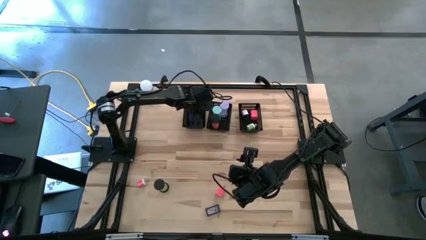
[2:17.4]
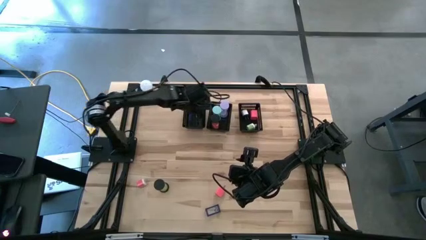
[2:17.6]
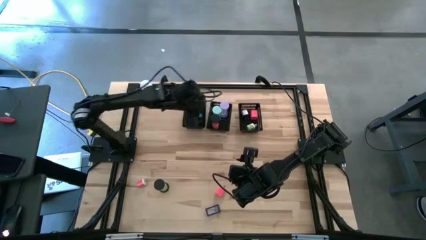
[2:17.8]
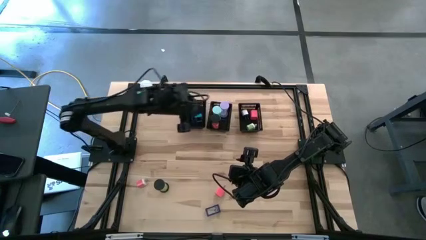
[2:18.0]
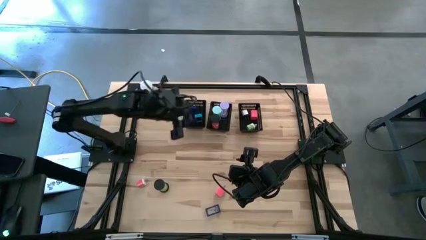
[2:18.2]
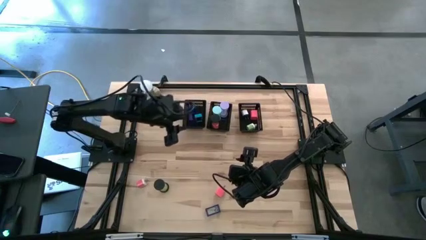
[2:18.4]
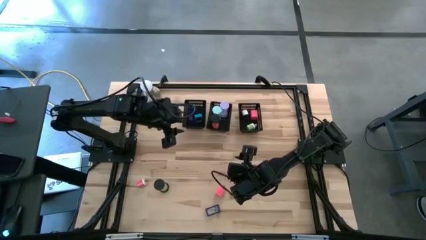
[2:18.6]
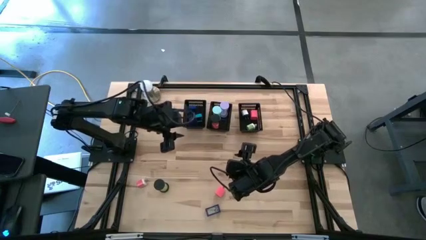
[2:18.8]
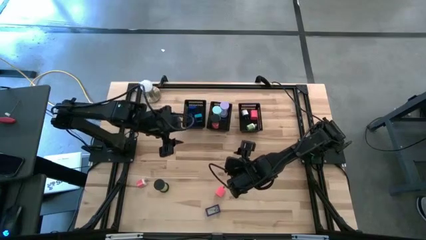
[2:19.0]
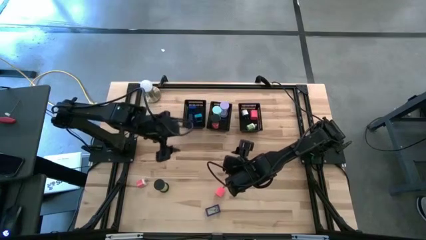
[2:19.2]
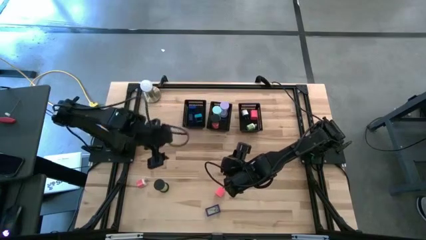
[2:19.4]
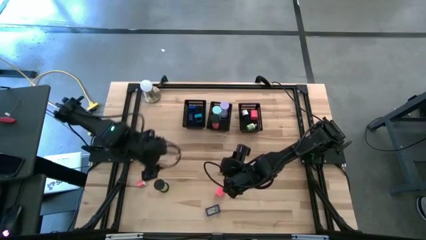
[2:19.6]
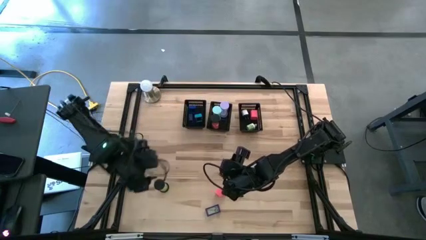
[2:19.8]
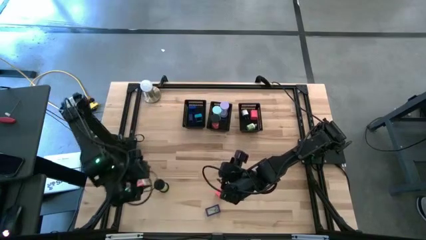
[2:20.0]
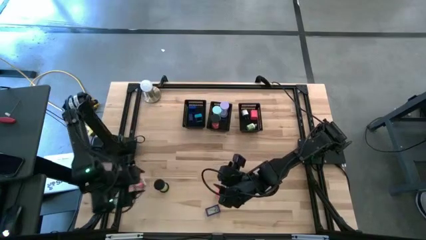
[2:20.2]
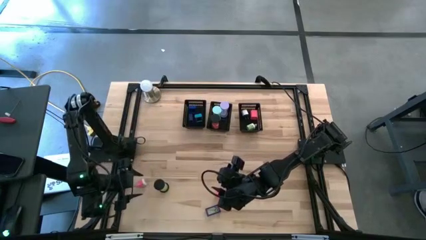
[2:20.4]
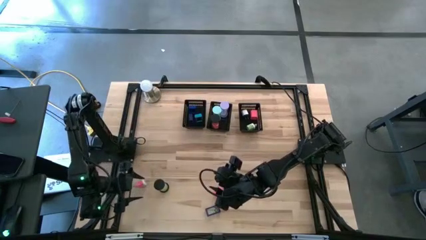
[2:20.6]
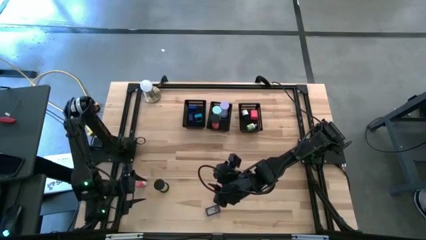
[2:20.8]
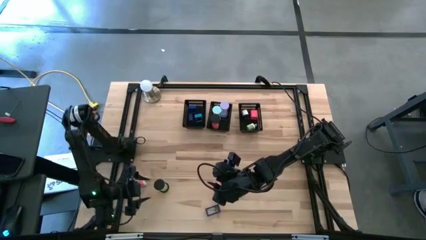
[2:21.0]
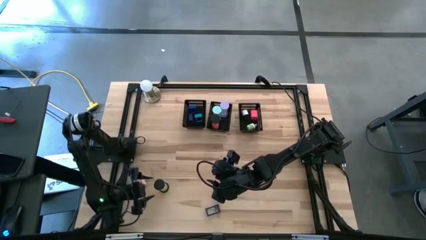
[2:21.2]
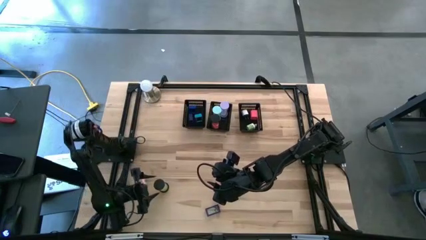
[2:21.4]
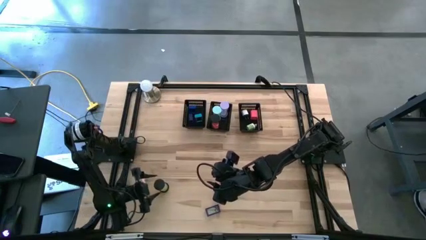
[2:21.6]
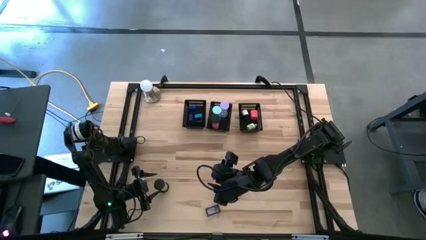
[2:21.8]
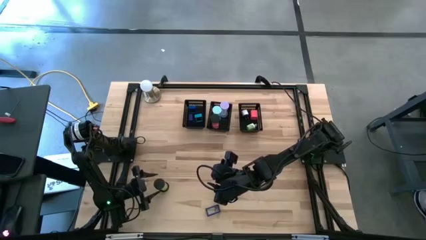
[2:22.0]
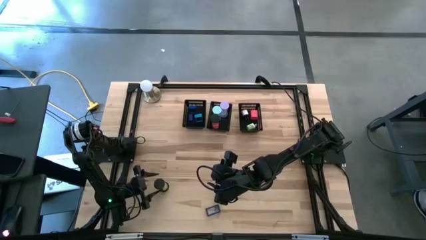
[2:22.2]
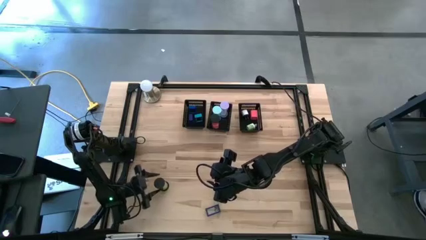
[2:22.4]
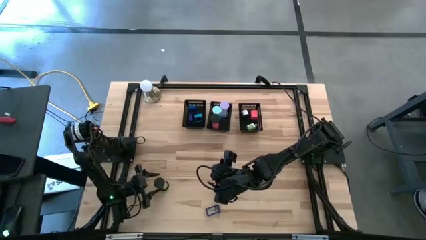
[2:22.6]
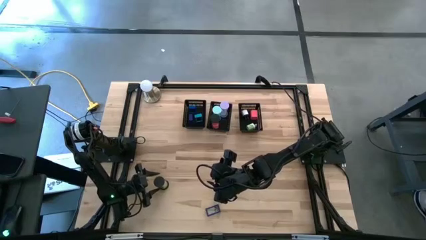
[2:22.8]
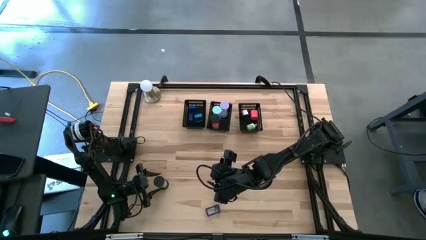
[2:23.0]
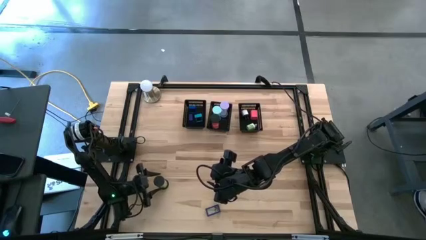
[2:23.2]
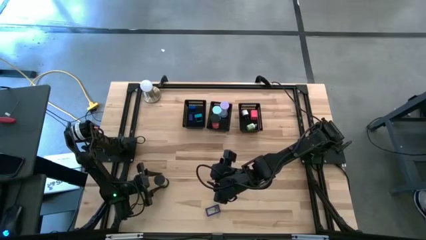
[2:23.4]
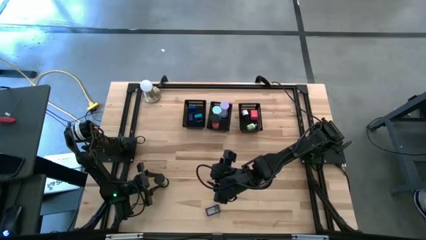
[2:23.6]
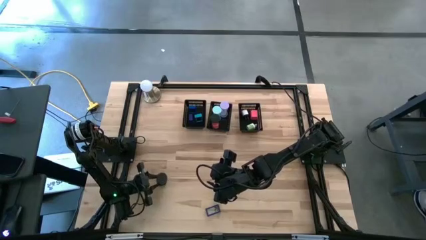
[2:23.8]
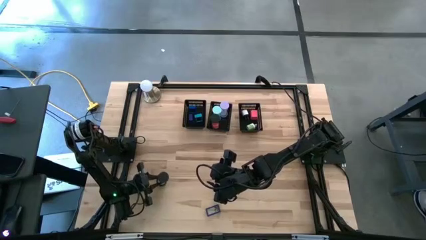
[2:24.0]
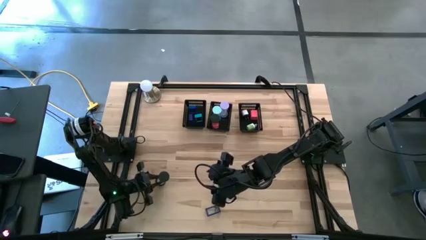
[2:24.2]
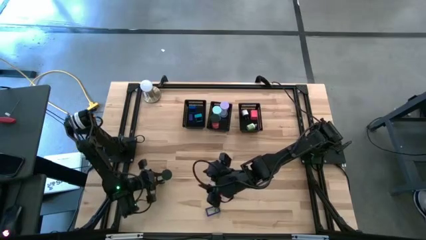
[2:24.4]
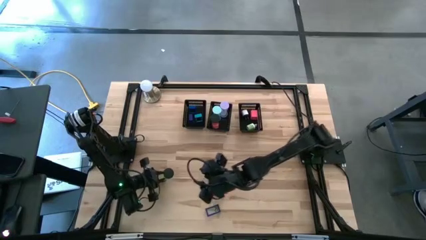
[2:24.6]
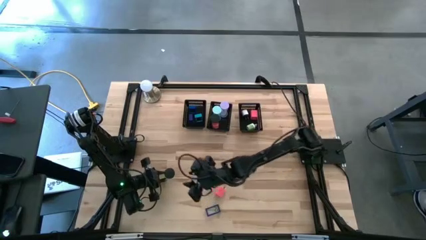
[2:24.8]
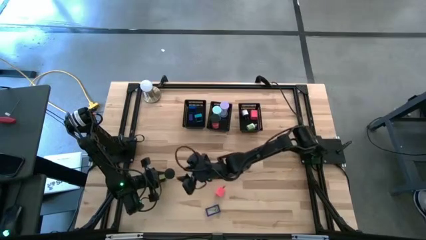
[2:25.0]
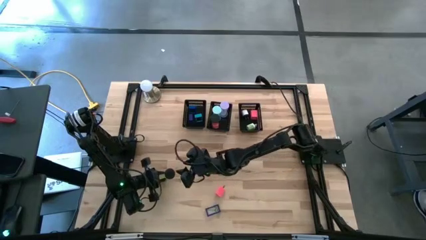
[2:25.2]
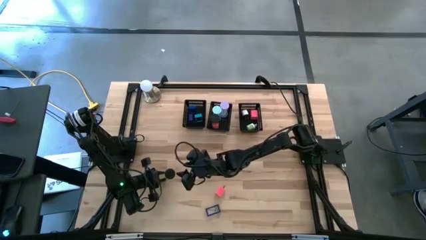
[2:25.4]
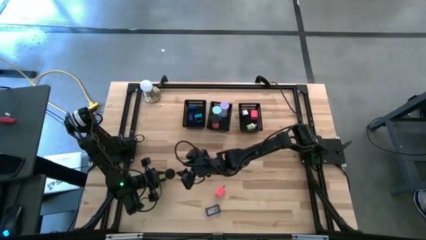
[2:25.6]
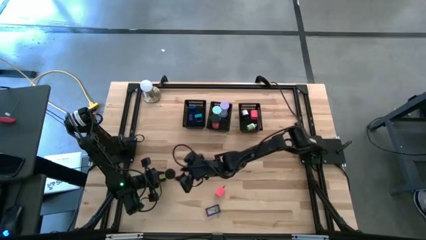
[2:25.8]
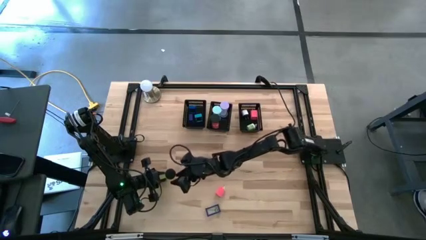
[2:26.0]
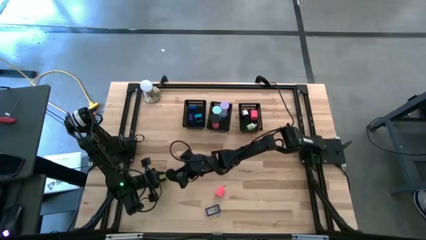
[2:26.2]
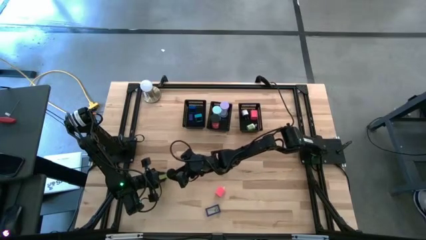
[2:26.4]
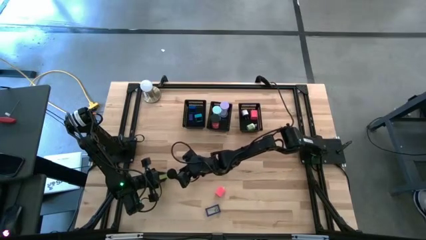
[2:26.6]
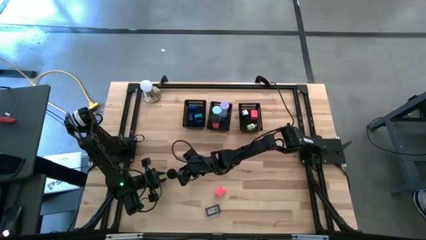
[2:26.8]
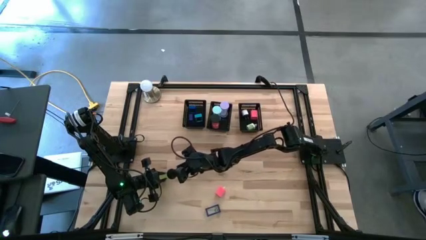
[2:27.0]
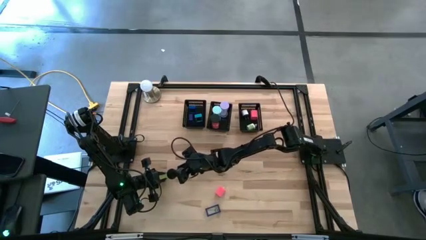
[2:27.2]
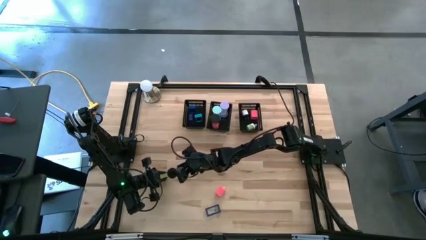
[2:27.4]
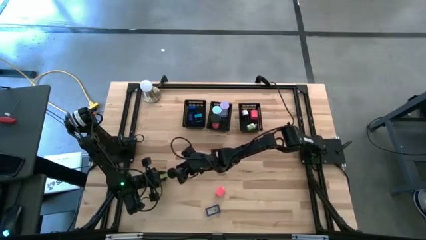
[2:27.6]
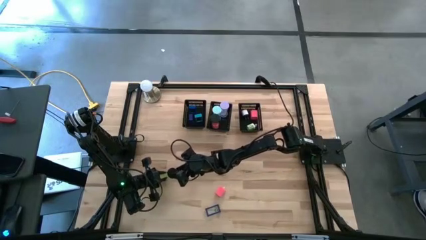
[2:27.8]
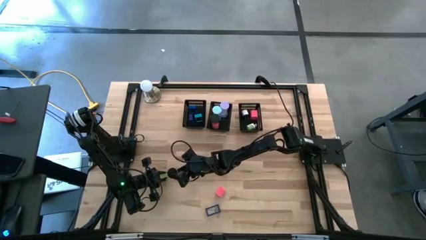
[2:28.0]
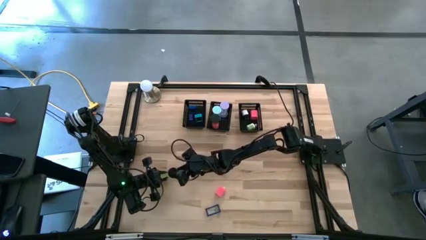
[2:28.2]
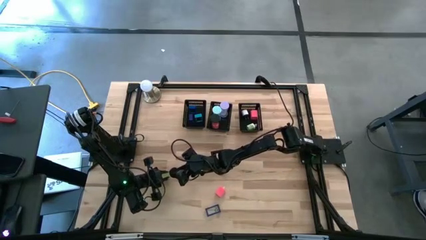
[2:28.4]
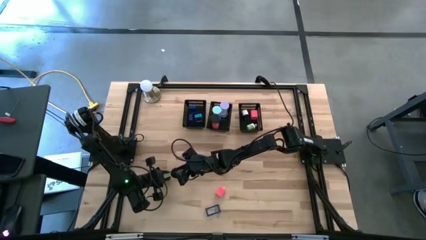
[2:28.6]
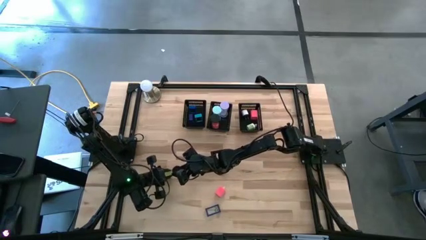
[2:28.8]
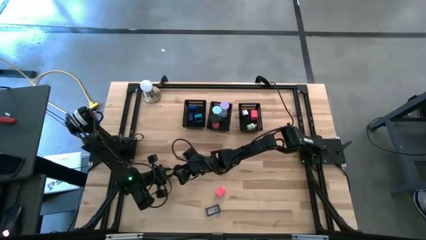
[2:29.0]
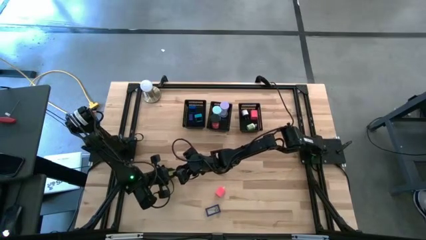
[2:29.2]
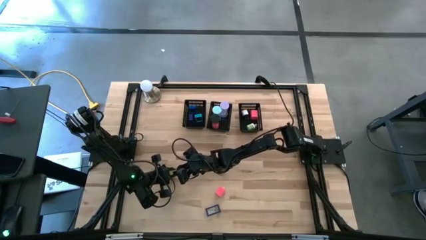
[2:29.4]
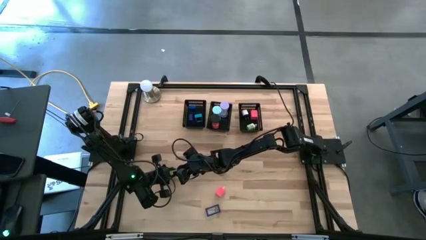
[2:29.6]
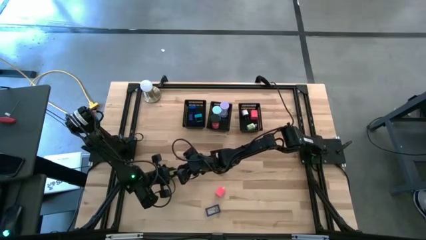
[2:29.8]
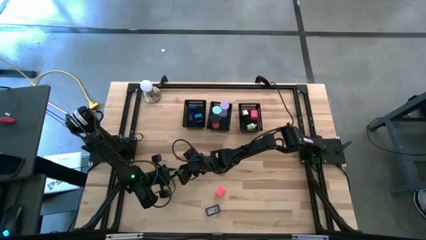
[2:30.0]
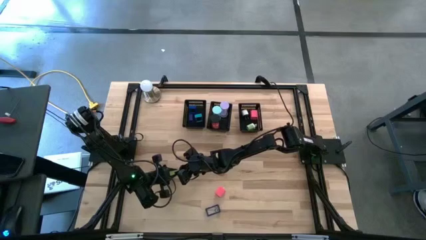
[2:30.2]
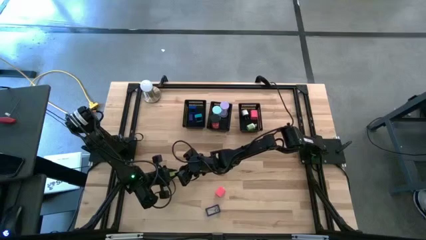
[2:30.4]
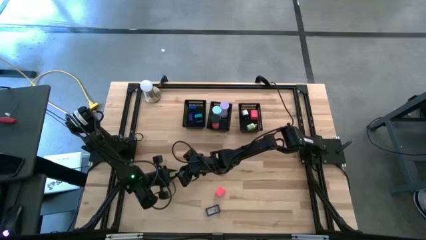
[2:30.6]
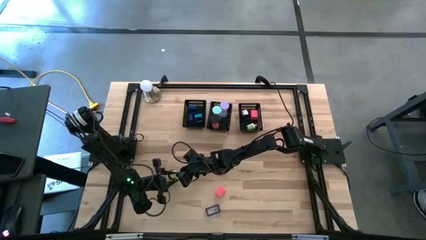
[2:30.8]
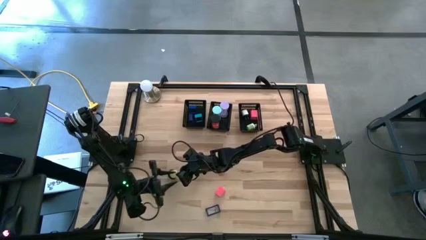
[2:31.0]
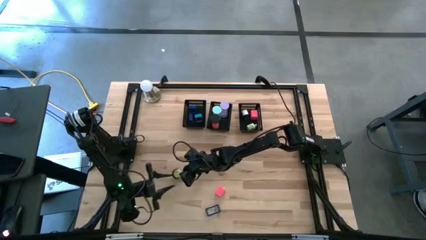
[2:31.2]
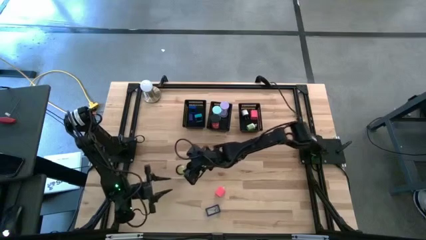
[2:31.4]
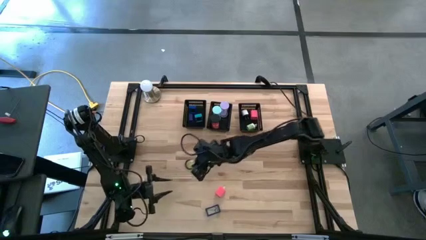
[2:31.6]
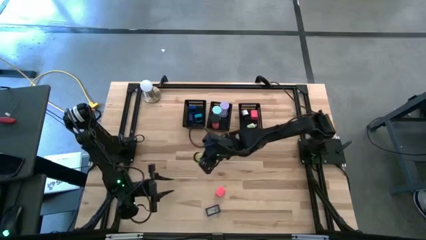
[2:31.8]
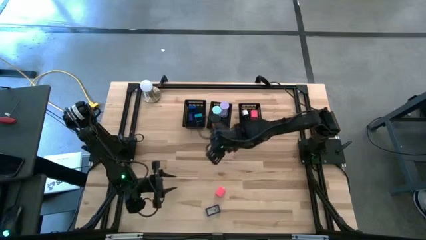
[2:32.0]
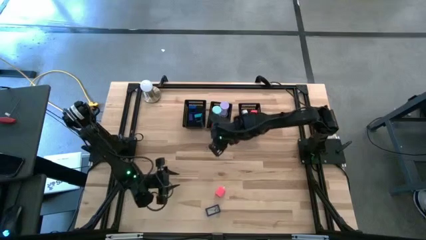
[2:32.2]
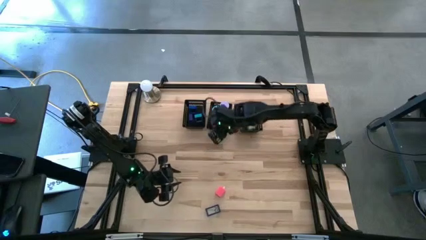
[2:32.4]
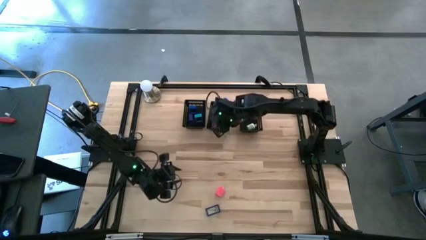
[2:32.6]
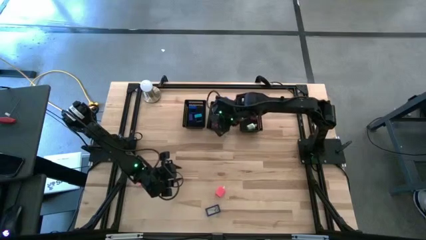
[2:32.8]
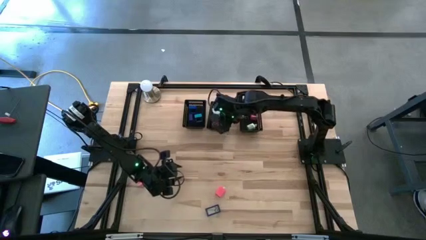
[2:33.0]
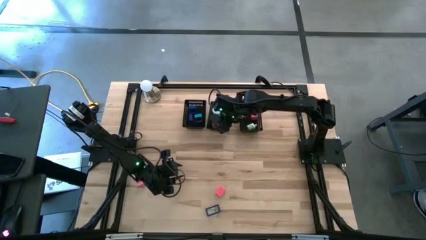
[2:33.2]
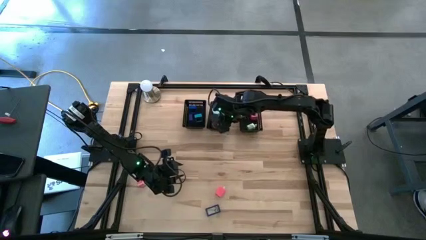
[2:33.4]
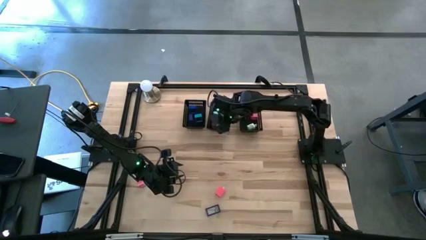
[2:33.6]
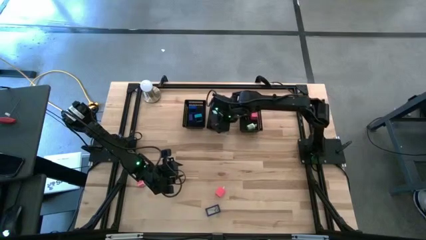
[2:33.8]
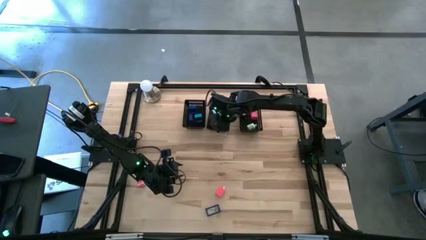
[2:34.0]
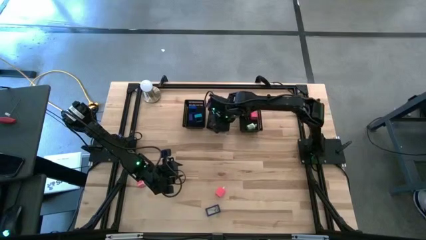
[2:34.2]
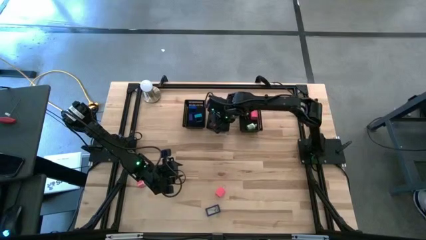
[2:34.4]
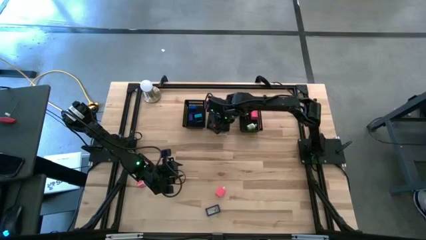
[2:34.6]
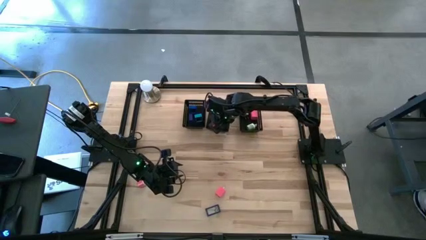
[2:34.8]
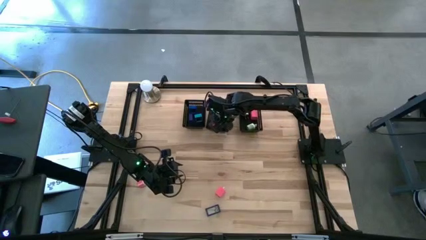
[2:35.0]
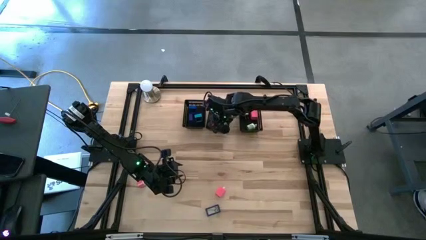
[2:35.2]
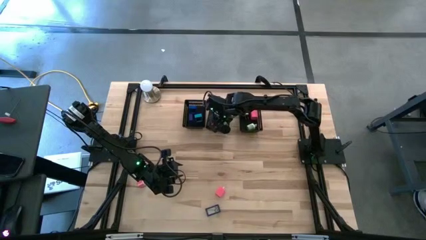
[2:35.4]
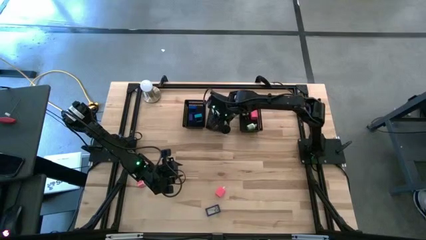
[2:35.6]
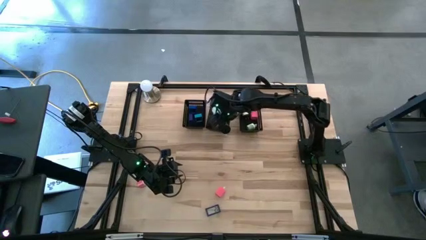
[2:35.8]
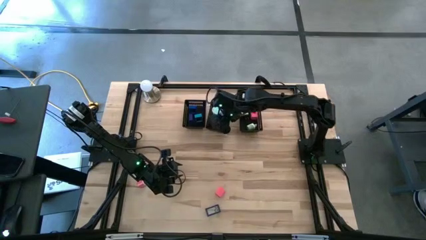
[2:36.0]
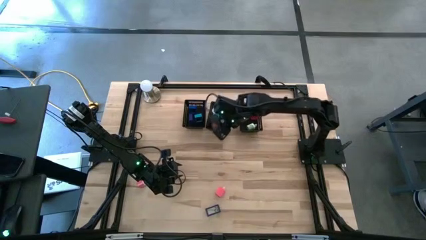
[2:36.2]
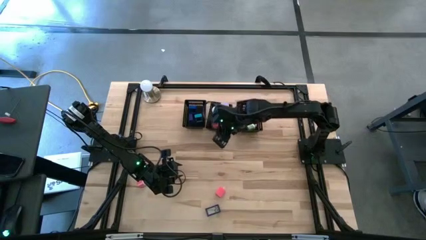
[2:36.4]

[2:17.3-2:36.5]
Task: Pick & Place Office items
Put the light green hourglass into the black bin
